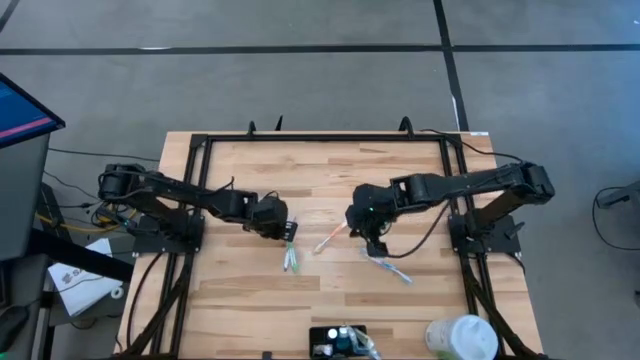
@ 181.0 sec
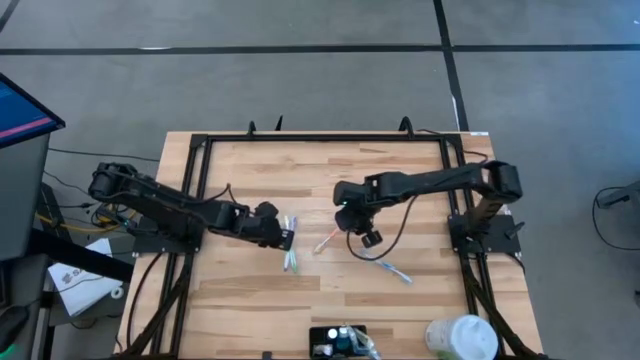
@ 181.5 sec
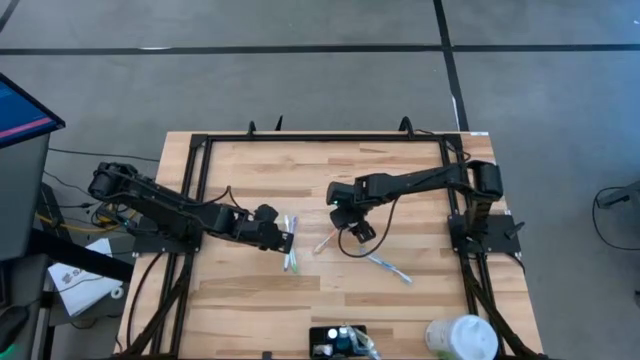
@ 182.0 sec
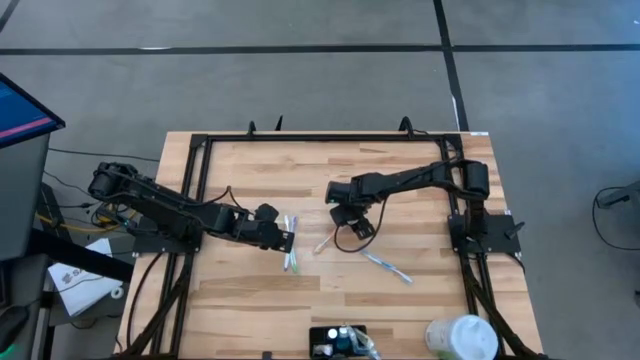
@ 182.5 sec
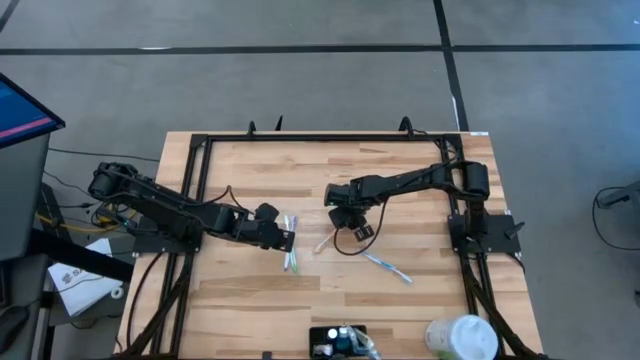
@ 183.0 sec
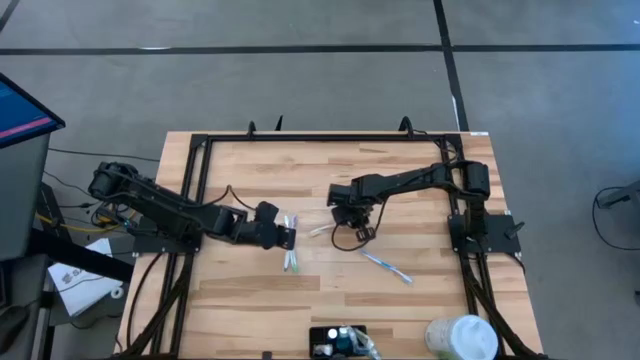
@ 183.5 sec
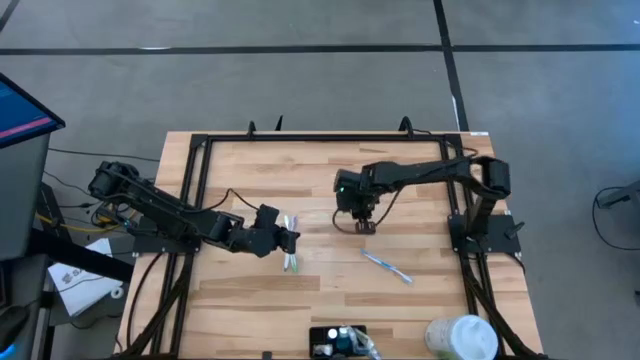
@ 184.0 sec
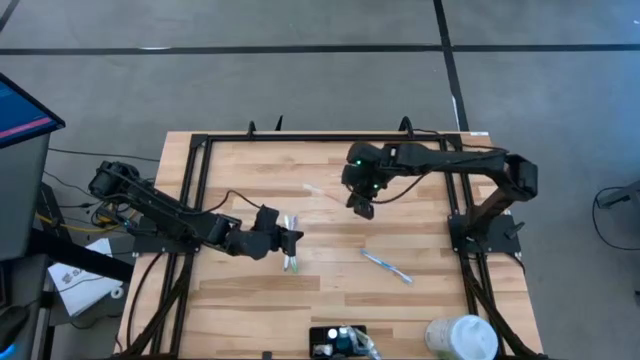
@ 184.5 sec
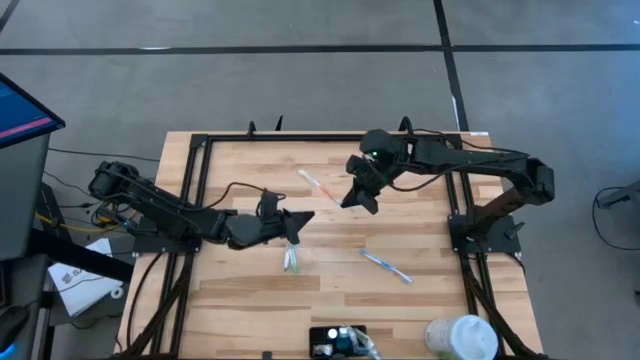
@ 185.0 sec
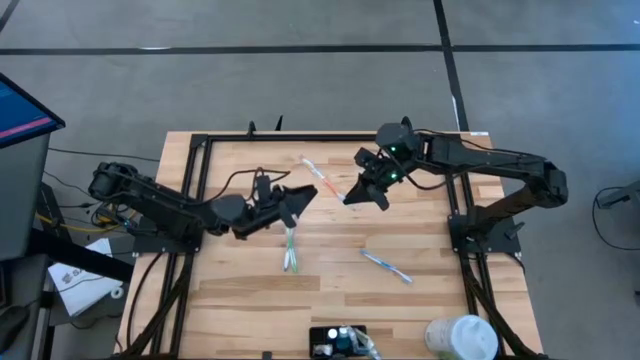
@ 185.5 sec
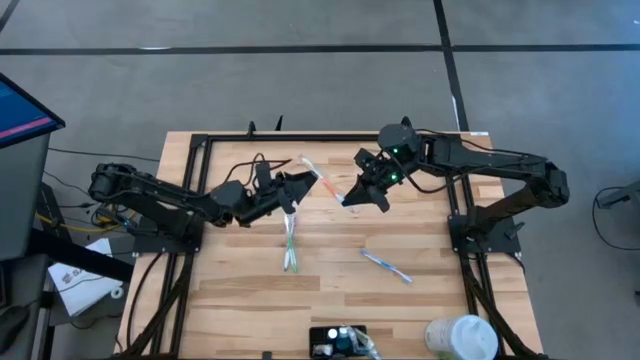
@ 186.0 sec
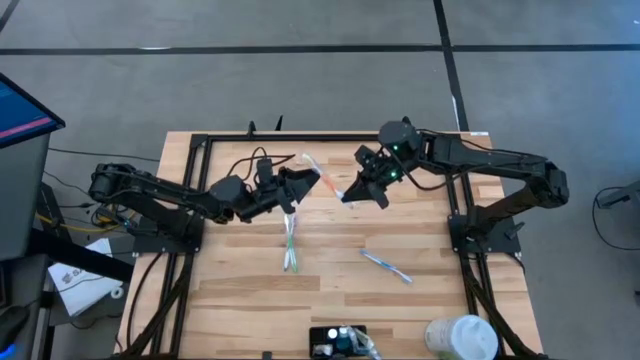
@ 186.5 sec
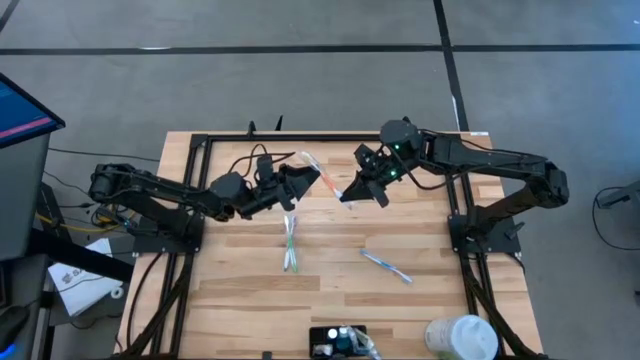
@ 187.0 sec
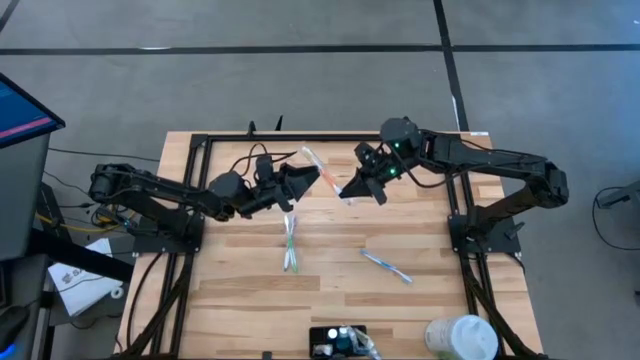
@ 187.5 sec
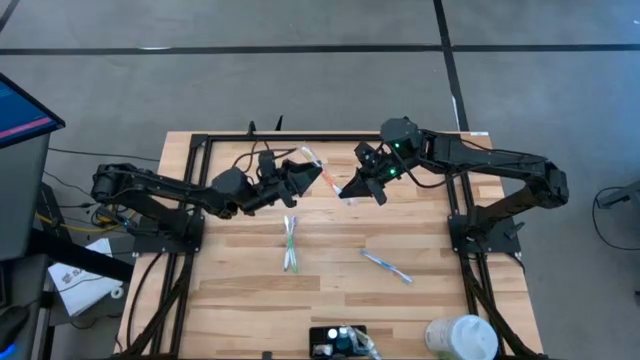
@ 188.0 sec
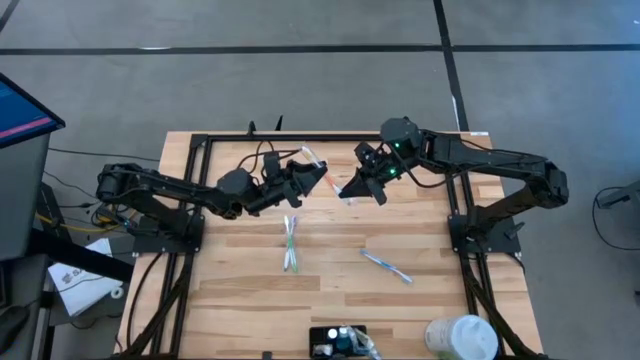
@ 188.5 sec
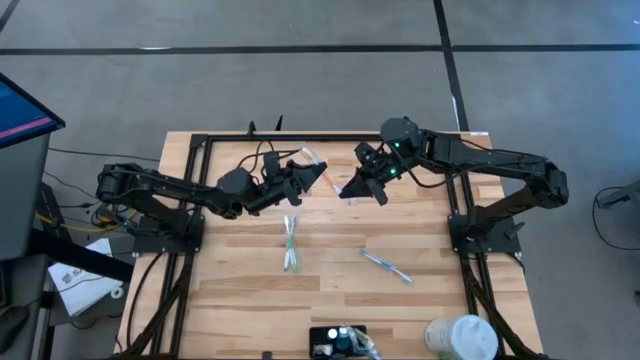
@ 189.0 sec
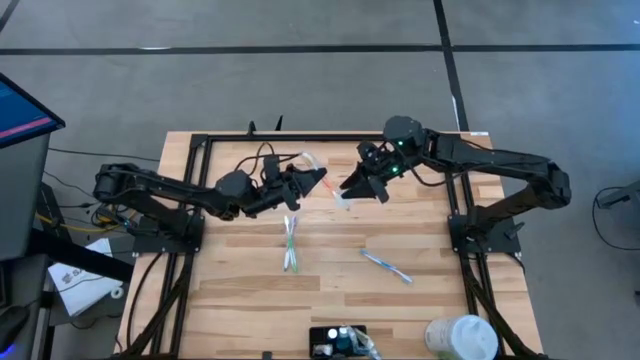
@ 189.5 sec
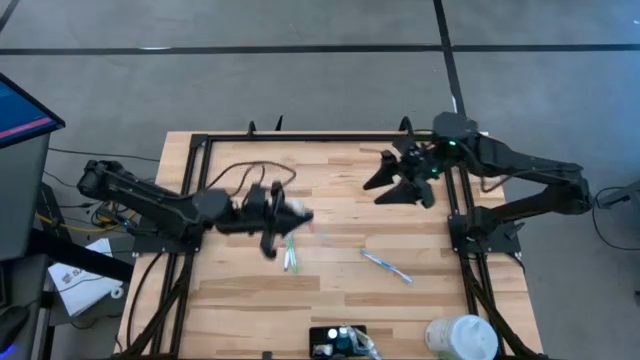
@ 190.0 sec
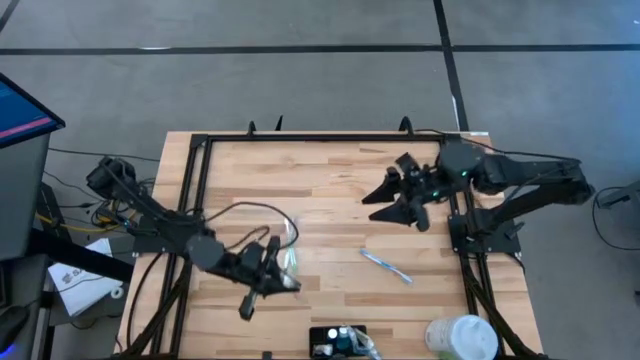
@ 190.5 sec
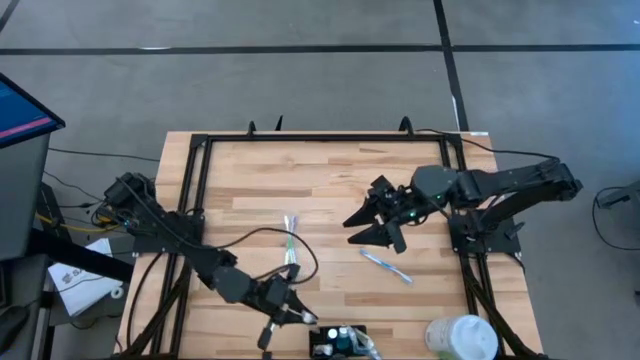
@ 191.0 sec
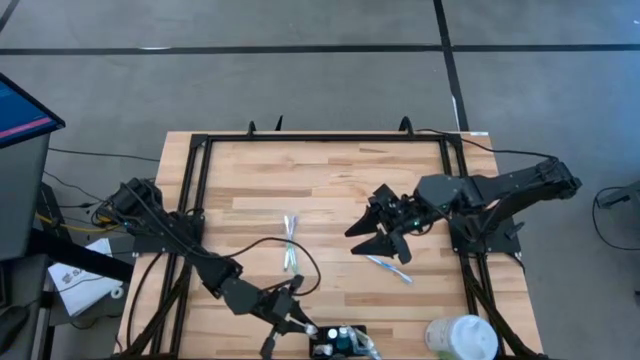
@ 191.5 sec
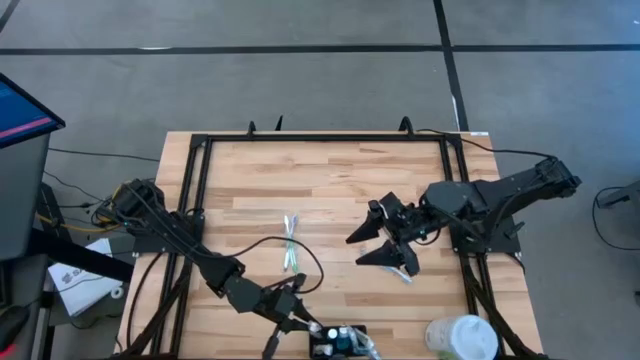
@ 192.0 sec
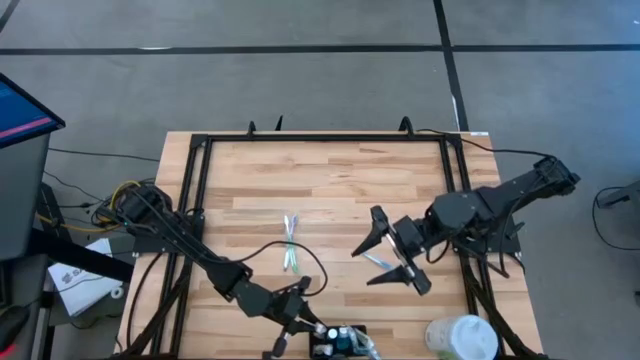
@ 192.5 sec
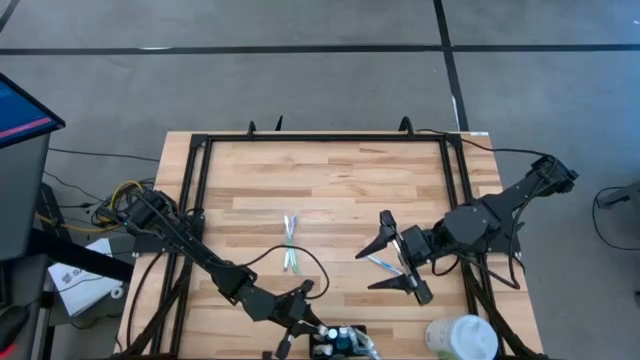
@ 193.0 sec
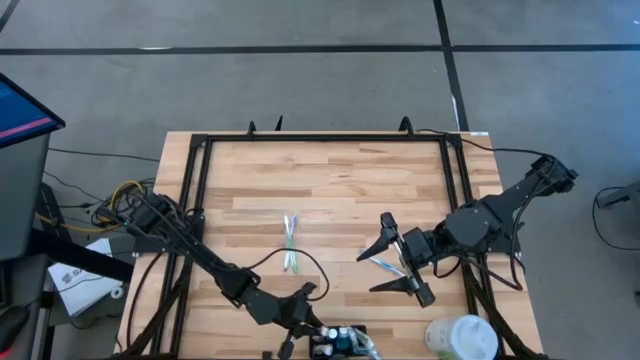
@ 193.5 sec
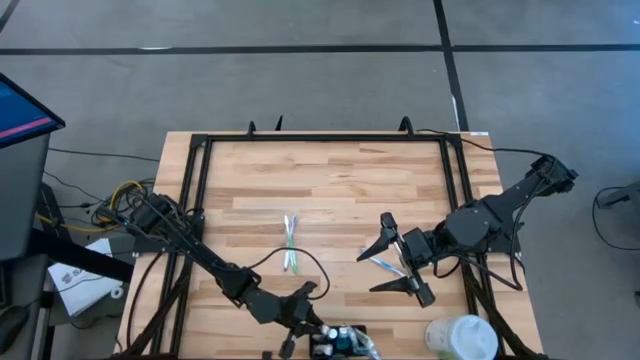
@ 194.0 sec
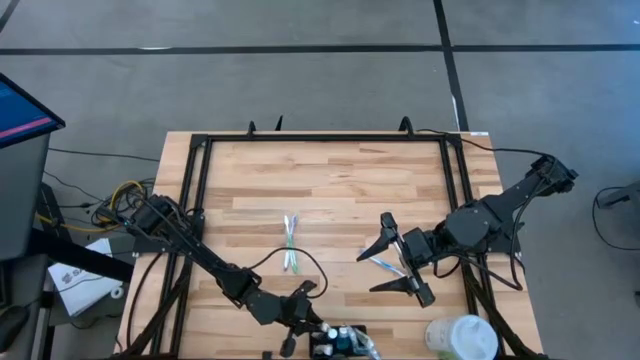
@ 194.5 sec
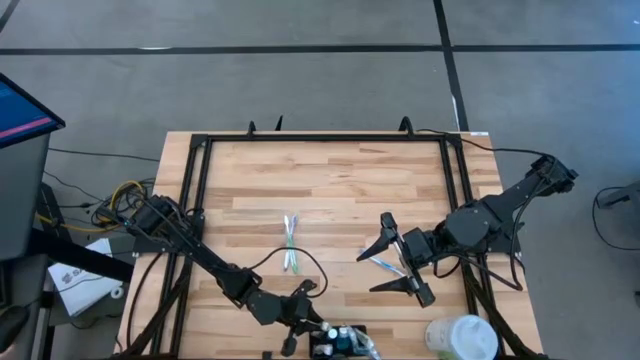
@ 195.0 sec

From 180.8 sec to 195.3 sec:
Task: Pick & Place toothbrushing station
Put the orange toothbrush into the black mesh organizer

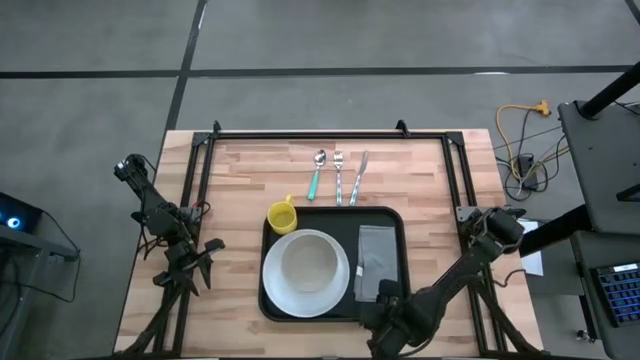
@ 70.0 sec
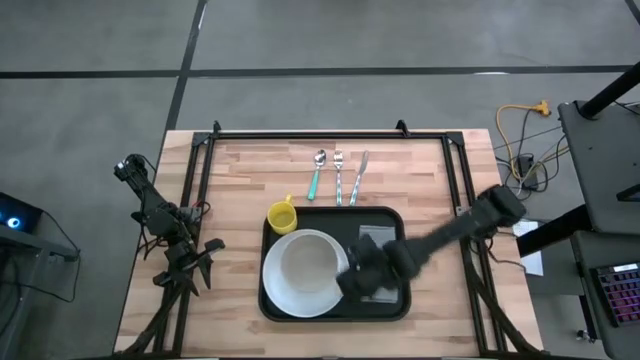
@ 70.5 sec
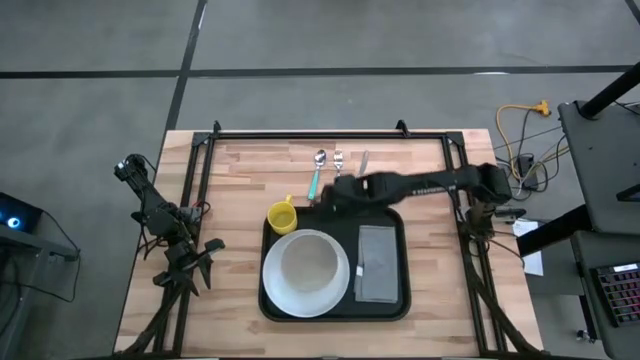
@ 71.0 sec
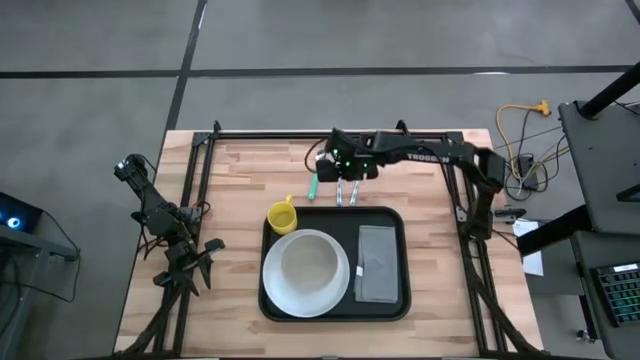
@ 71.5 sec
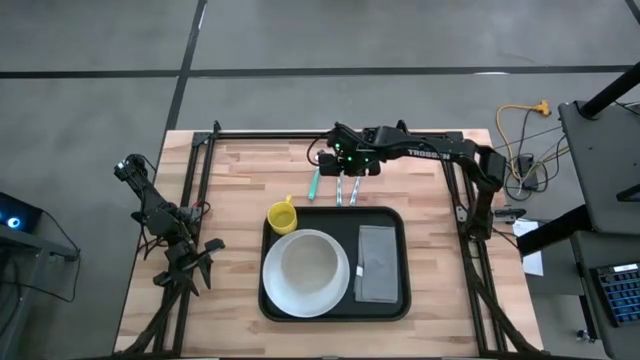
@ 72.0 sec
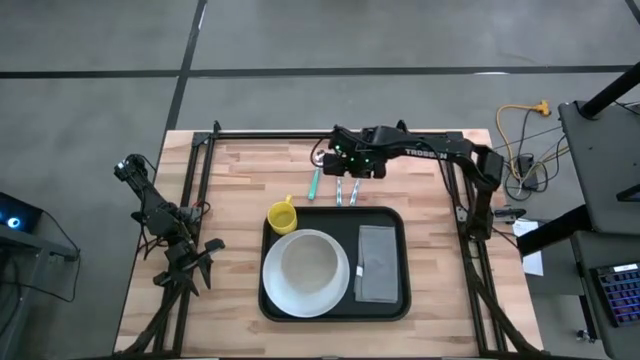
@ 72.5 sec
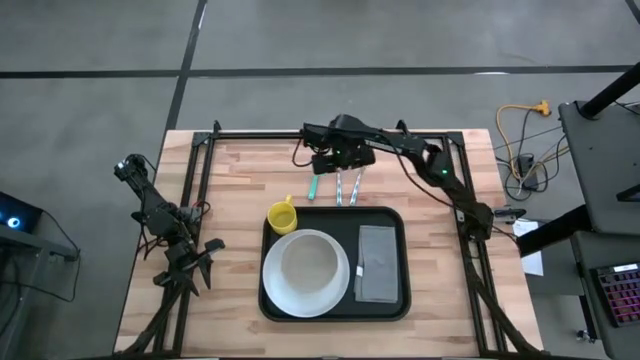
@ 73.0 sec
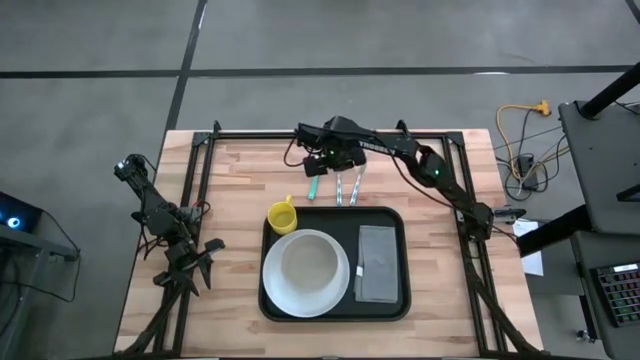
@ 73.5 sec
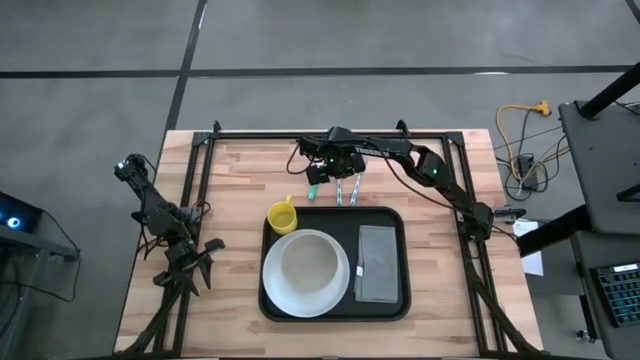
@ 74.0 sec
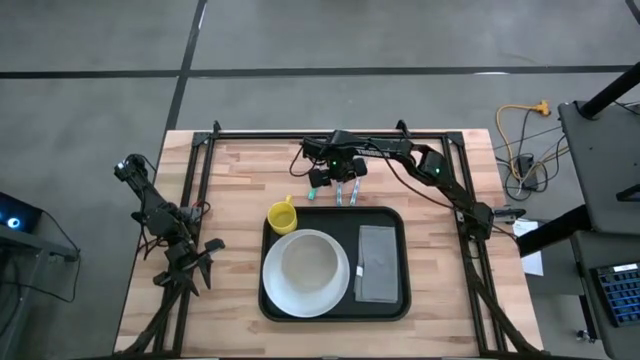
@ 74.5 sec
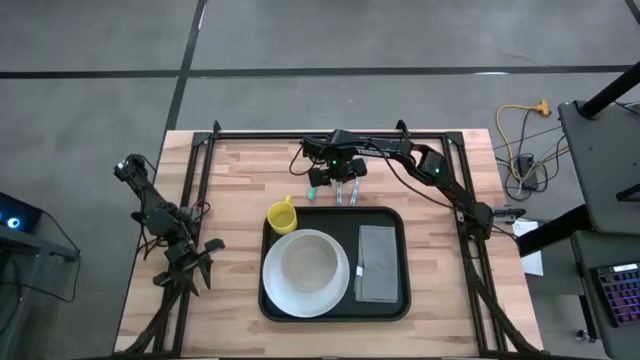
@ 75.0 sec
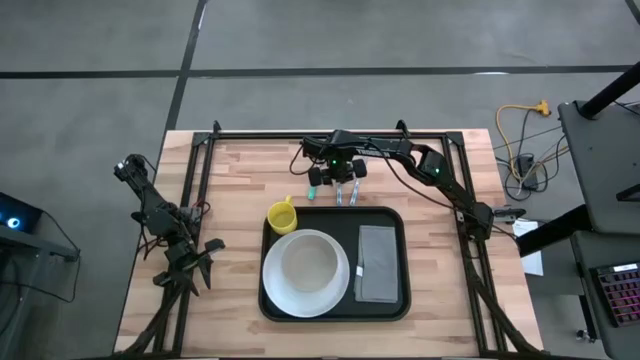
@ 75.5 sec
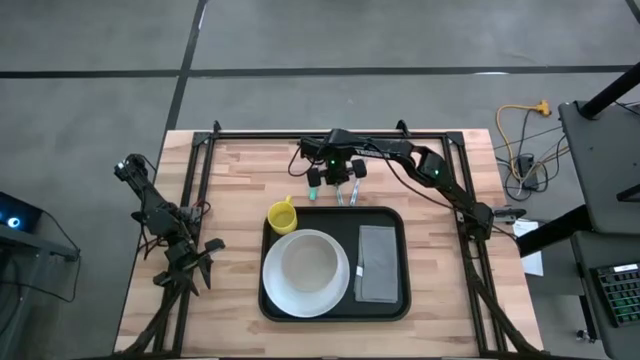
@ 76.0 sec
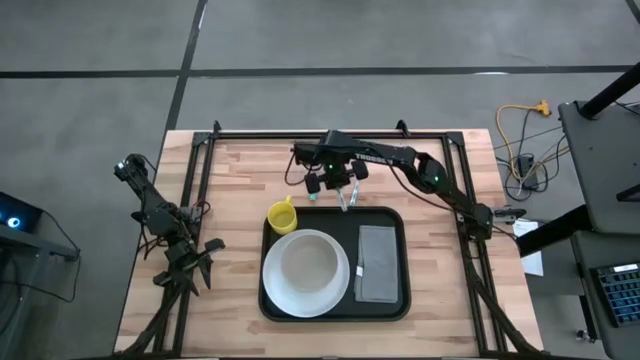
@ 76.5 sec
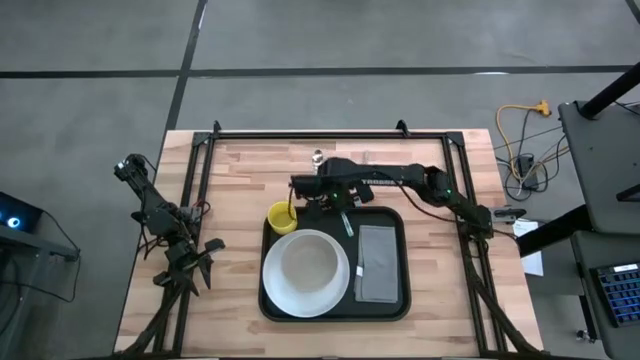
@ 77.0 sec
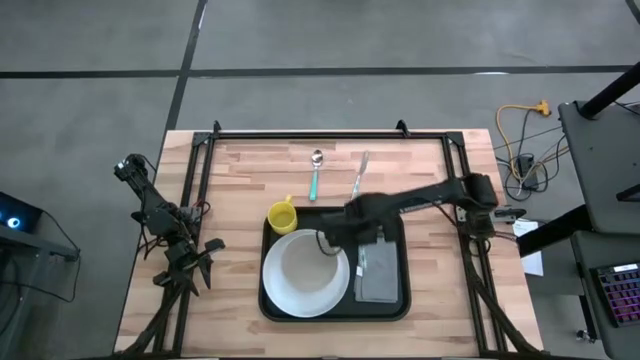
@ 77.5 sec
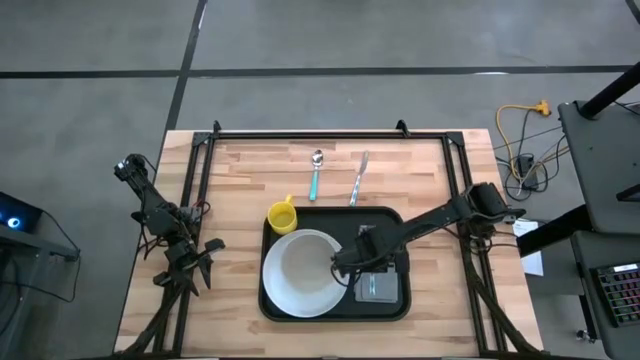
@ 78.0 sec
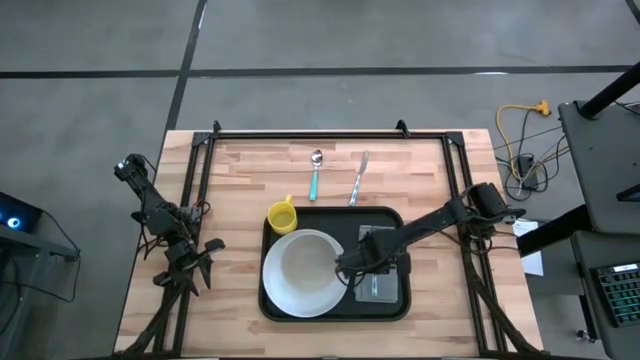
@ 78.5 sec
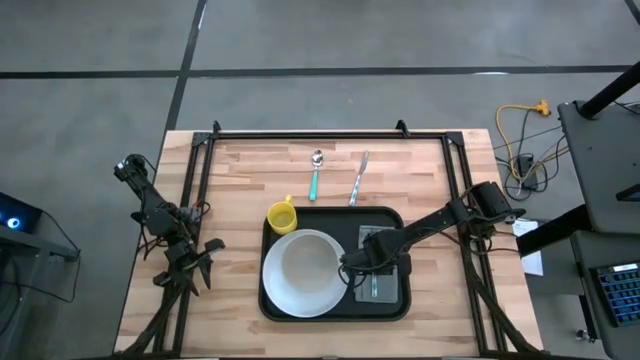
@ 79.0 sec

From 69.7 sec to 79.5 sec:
Task: Set up tray
Put the blue patterned fork on the gray napkin
